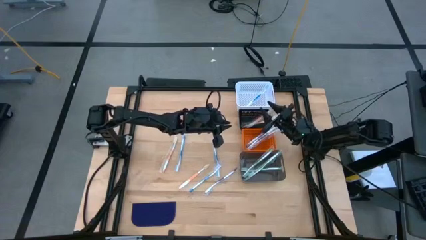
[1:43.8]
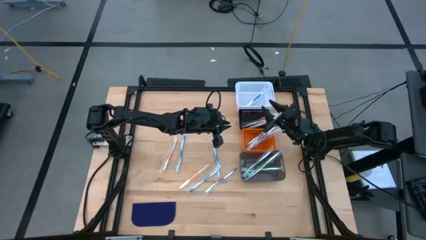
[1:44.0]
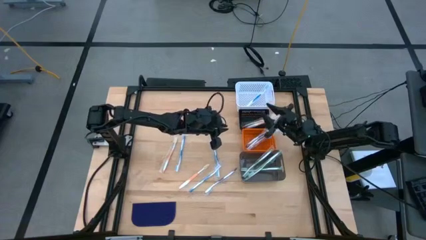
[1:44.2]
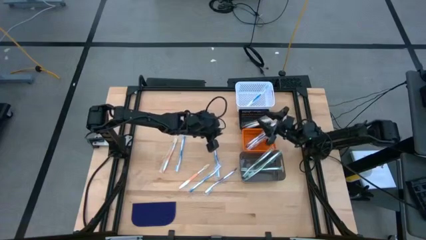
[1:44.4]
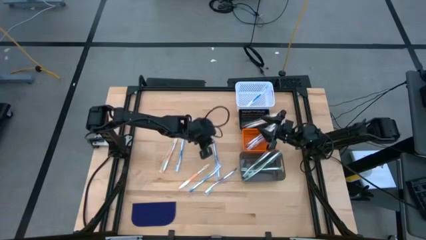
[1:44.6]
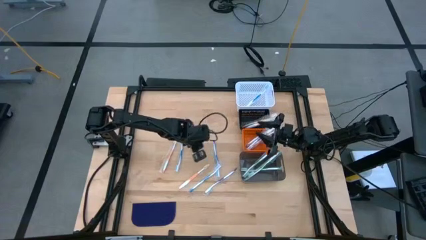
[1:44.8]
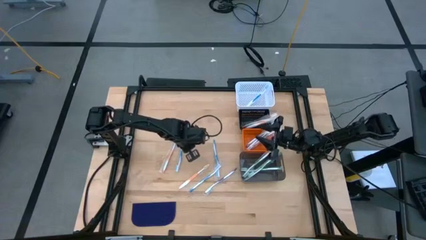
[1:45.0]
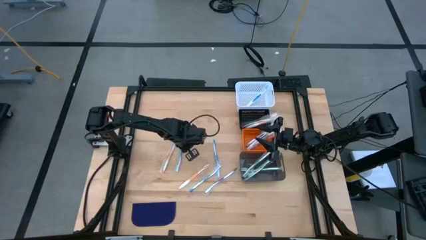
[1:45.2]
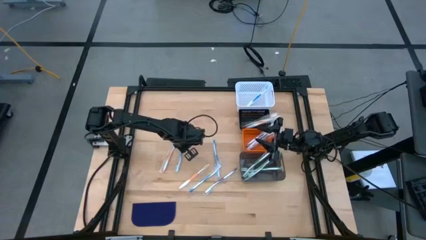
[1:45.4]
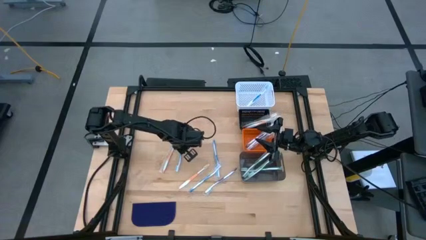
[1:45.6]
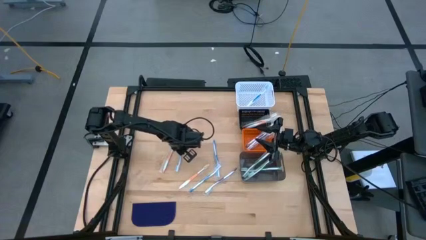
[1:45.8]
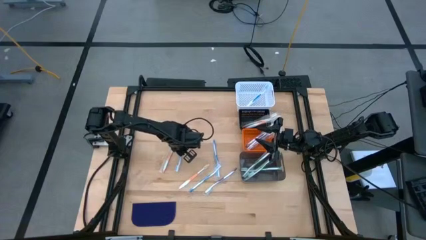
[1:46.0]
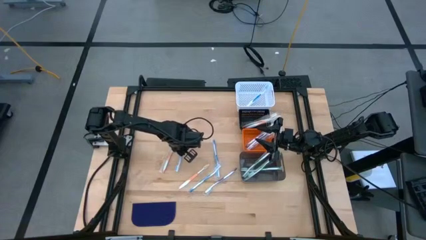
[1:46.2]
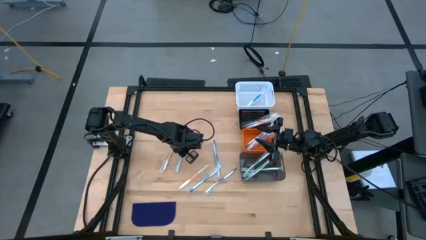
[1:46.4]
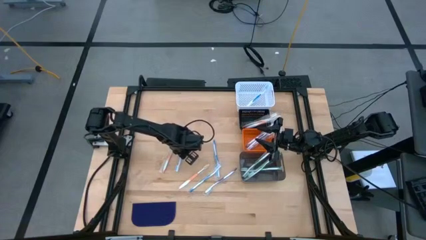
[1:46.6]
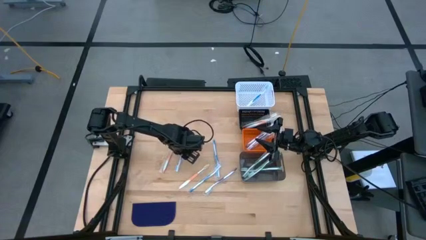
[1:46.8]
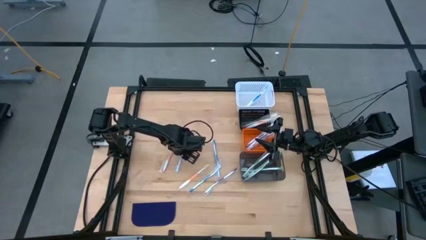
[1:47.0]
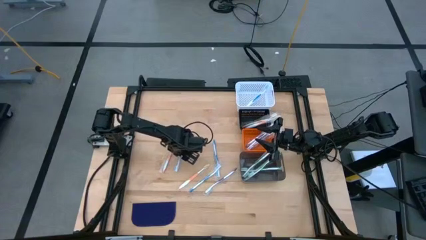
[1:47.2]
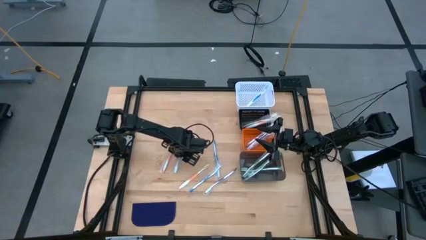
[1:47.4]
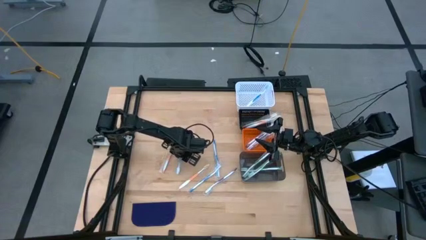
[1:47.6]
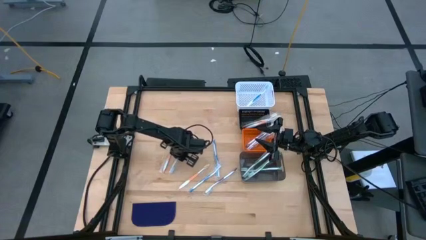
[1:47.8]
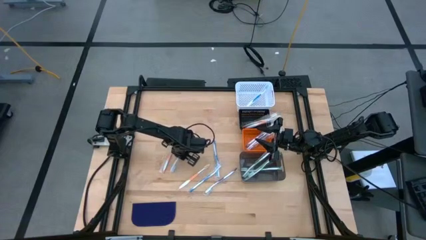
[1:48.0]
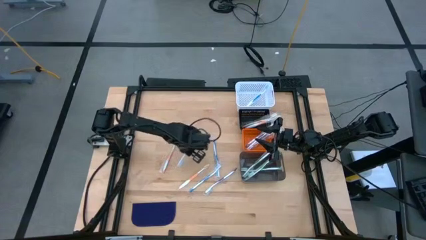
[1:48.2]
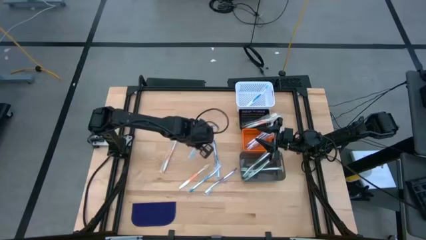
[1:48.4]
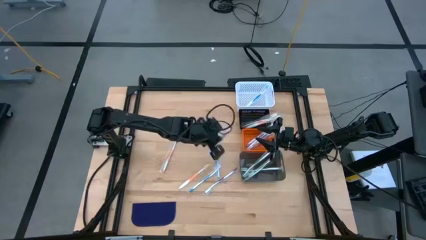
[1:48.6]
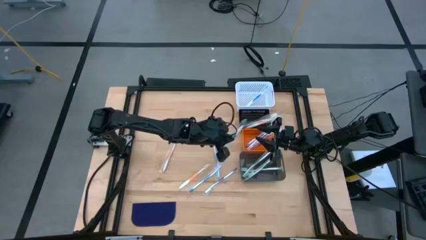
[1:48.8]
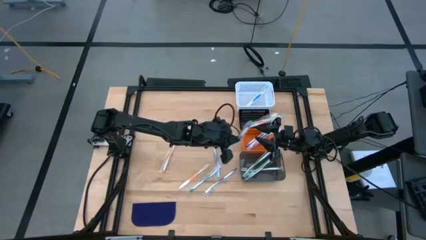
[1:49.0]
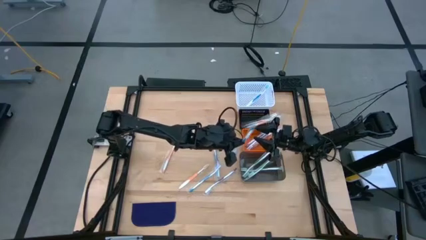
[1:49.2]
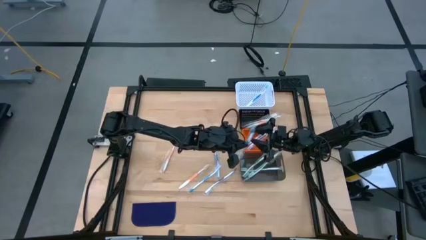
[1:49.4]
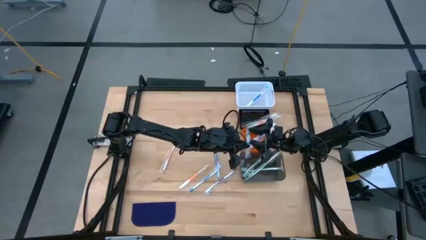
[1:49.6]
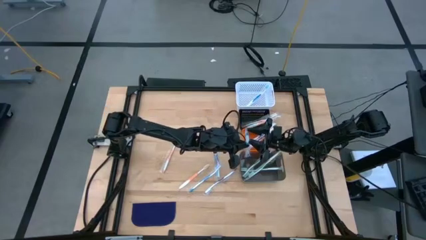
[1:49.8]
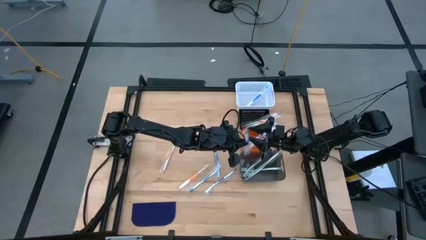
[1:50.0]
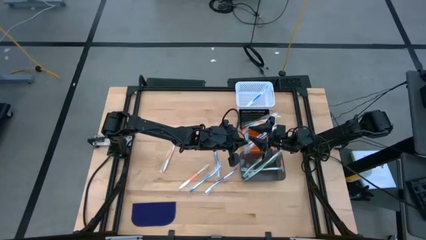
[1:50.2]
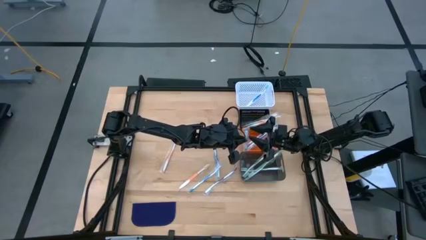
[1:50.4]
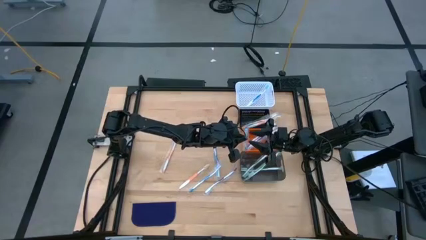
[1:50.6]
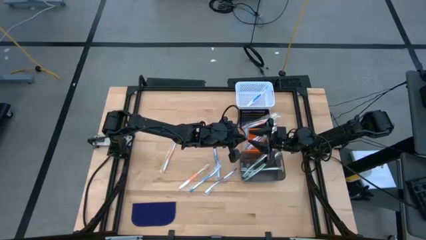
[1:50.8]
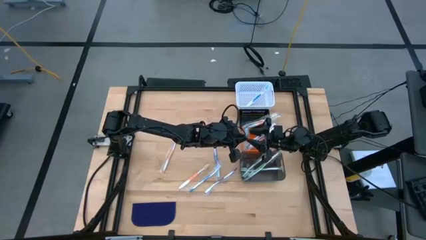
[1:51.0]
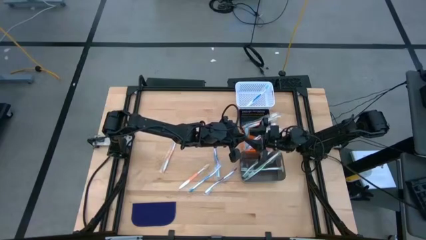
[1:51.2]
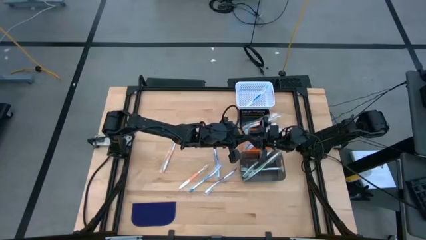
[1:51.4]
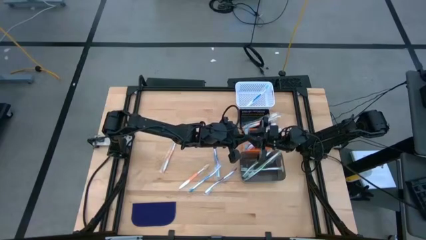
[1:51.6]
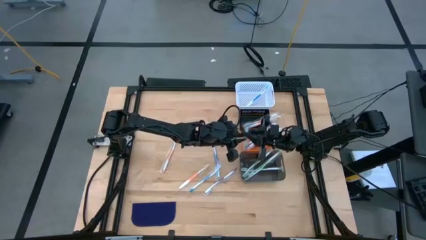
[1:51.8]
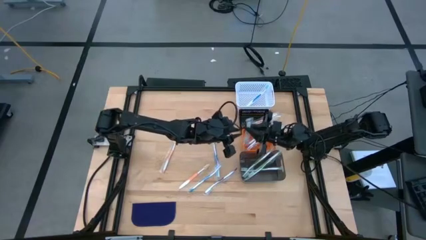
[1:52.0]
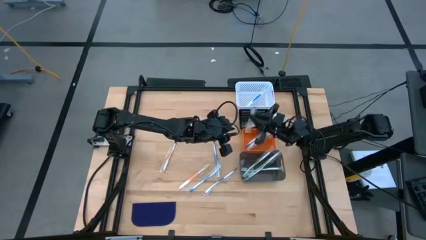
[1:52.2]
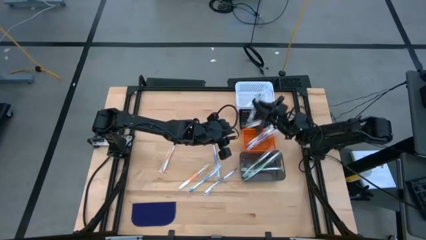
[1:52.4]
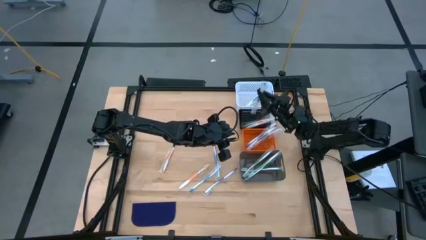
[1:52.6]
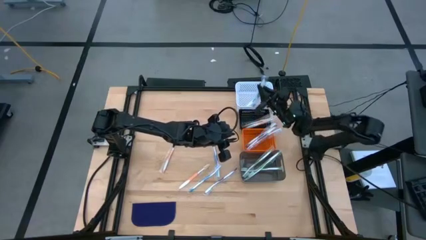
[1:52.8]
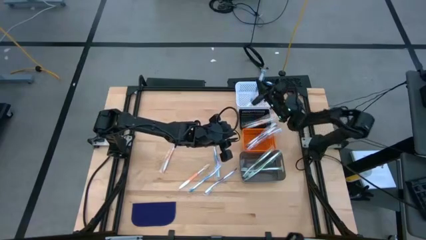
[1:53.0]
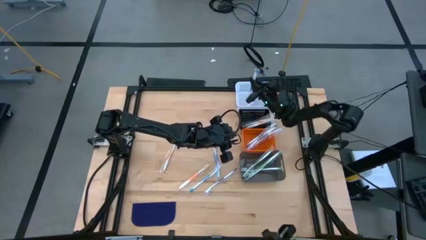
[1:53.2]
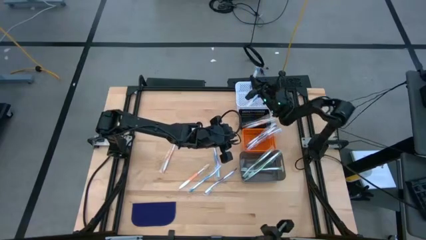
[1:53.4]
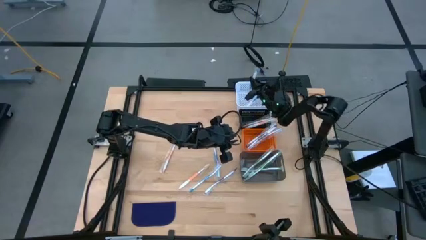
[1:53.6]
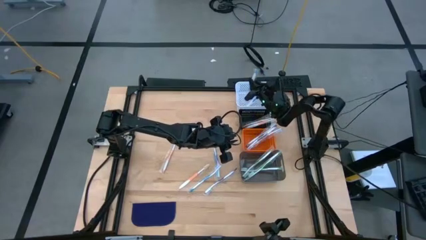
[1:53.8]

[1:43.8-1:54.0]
Task: Pick & Place Toothbrushes
Put the blue toothbrush into the white bin

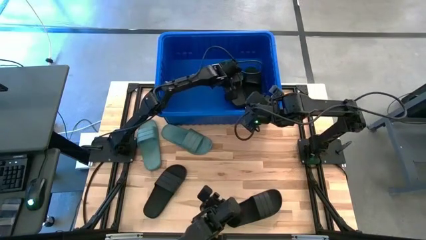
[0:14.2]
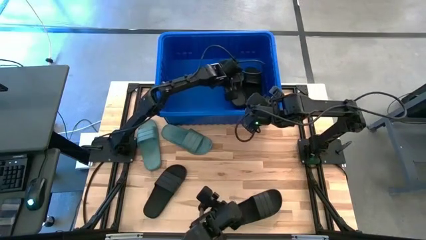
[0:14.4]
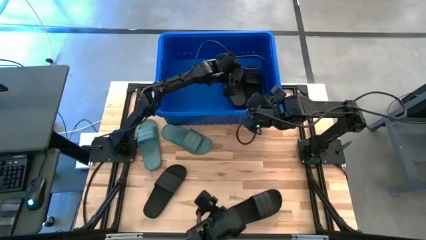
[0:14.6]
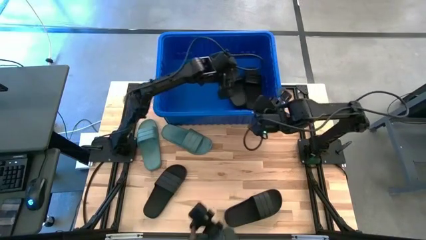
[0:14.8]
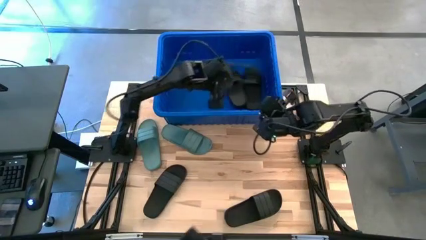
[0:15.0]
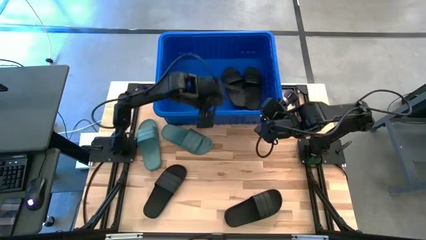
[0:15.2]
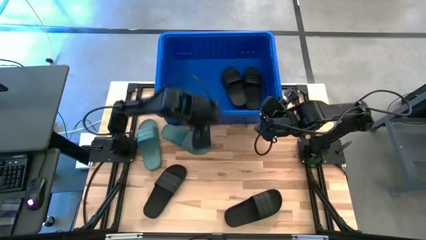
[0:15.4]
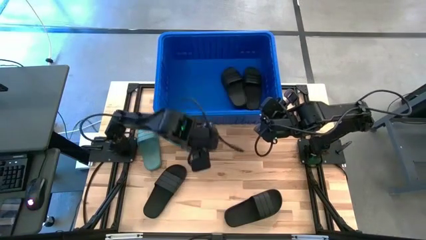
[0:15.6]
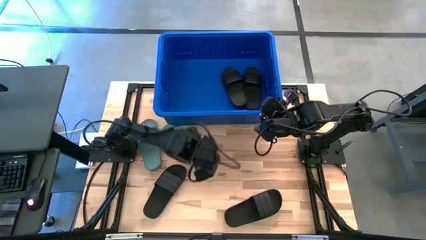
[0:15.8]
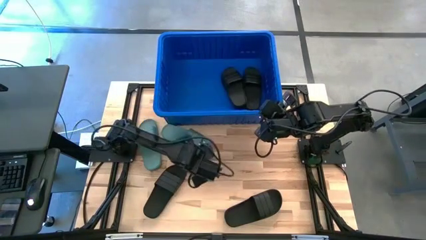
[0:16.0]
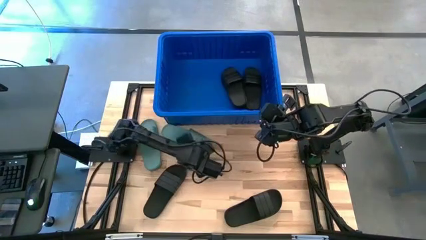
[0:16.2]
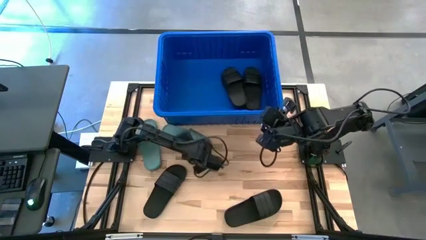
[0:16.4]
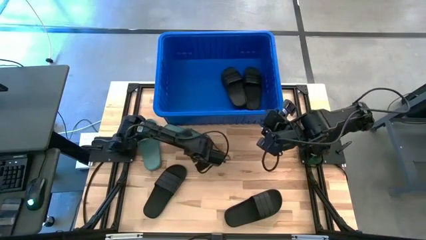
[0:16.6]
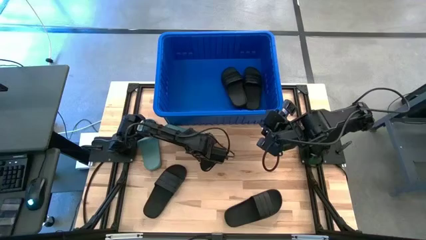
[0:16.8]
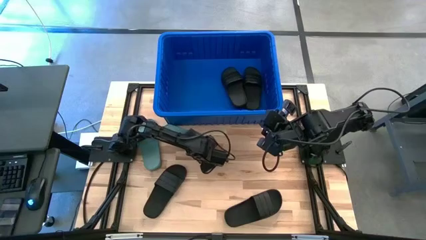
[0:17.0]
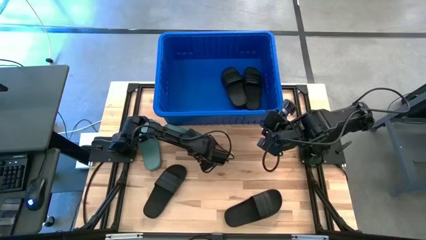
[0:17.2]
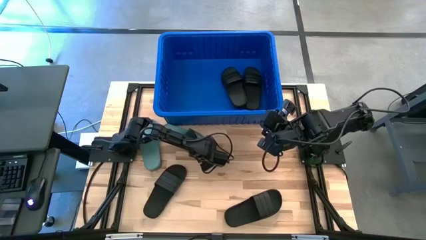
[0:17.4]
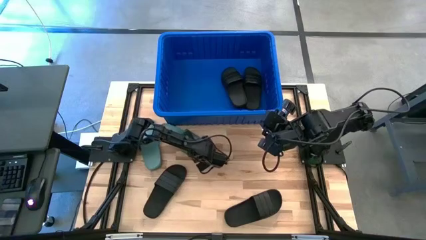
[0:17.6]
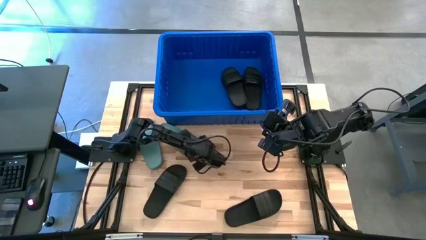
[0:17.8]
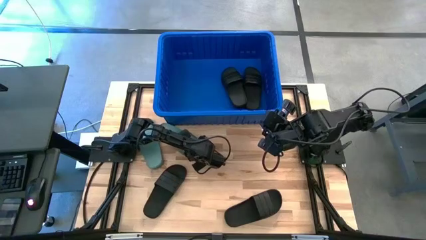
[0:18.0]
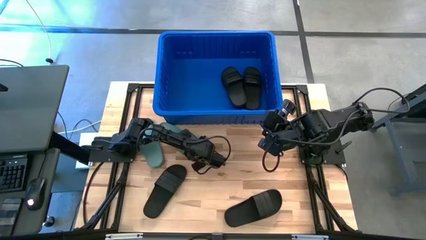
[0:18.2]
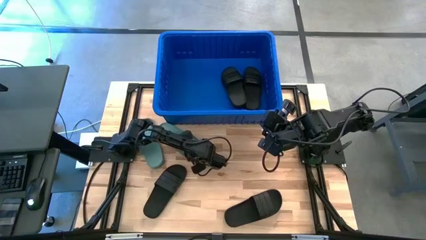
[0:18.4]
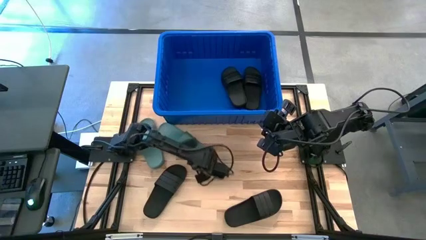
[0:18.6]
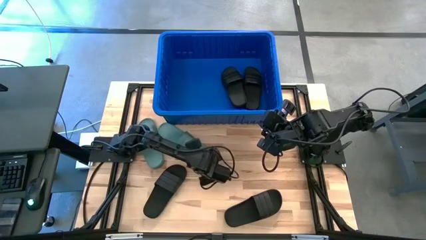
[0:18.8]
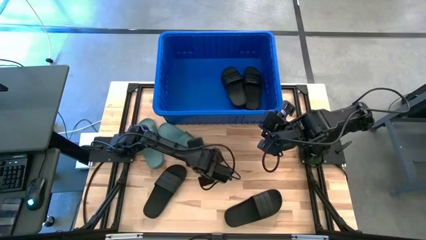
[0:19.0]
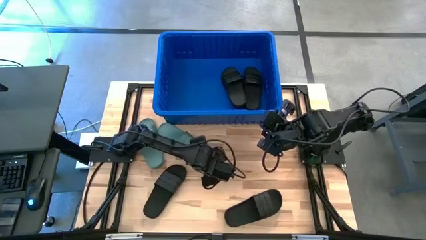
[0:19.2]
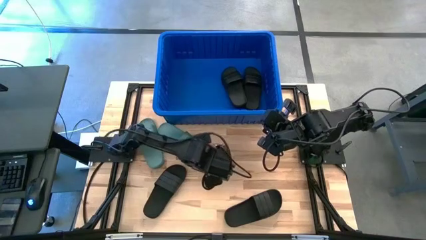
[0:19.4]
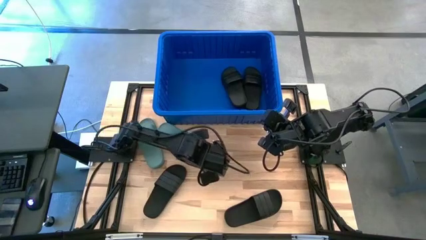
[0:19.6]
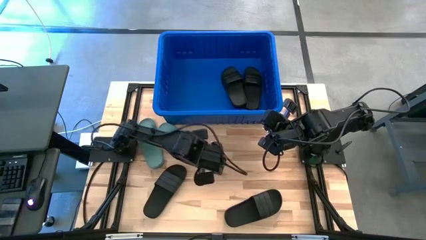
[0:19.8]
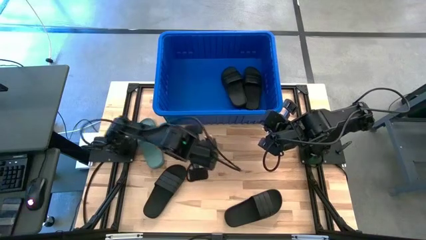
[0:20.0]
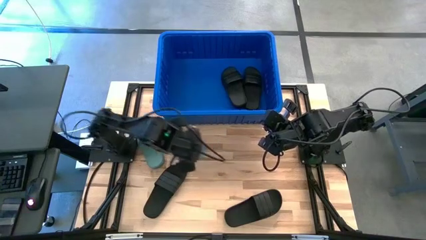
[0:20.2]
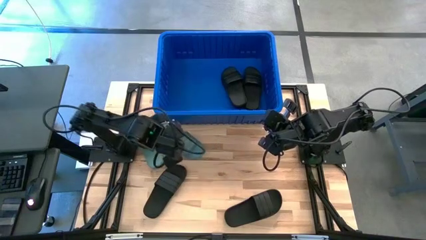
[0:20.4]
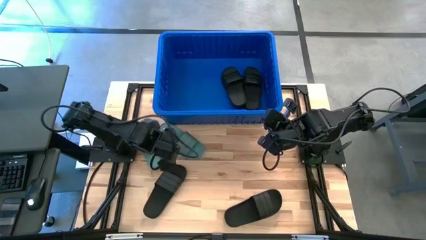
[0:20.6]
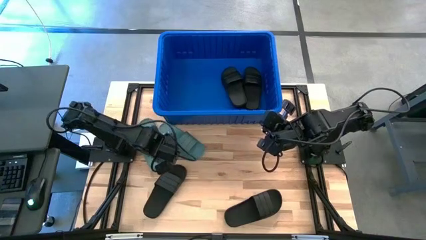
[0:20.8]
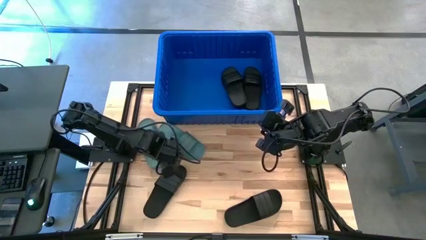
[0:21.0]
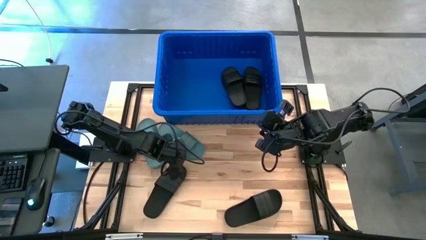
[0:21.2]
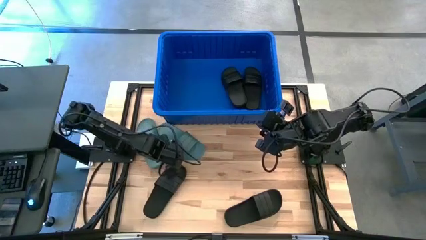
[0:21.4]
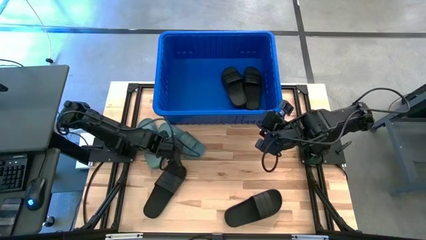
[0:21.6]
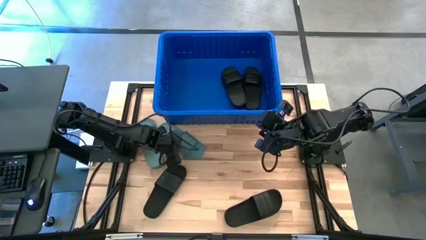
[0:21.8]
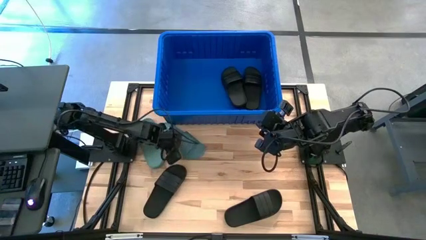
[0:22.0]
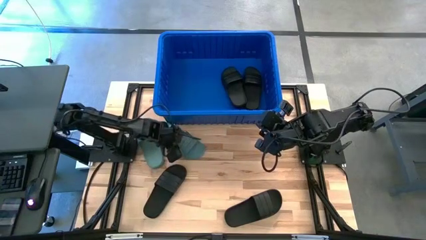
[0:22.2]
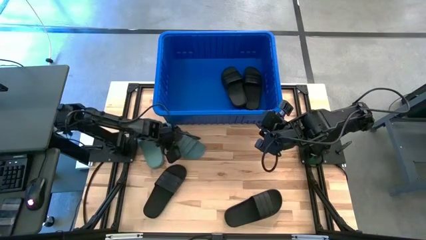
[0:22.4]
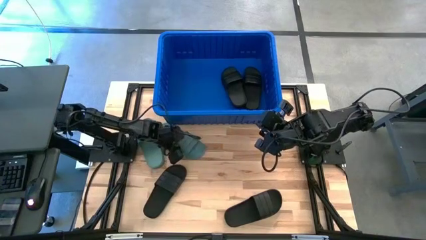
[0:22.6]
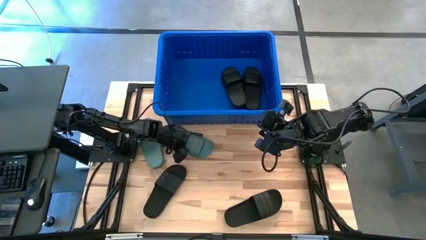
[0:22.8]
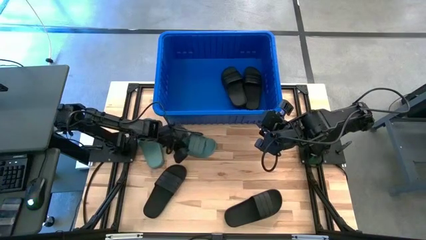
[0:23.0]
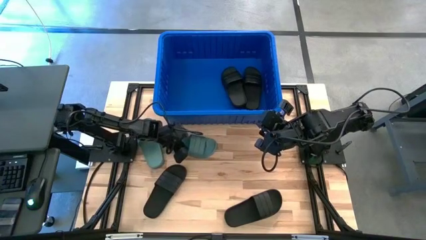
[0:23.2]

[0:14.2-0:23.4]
Task: Pick and place slides into bin
Put the green slide into the blue bin
